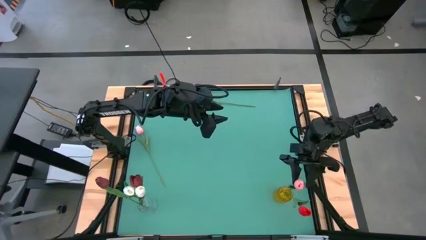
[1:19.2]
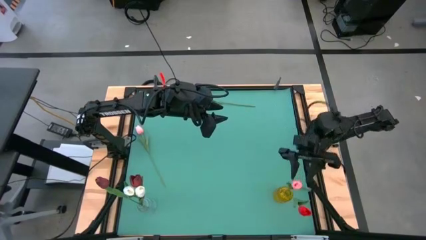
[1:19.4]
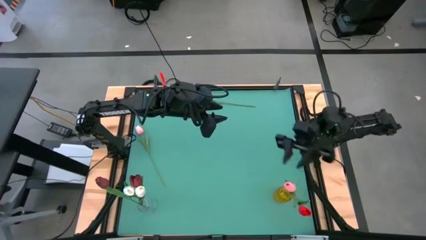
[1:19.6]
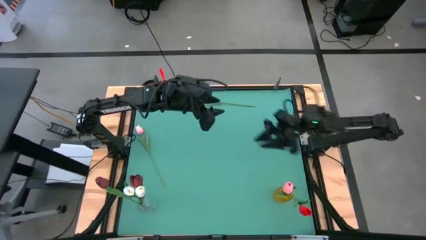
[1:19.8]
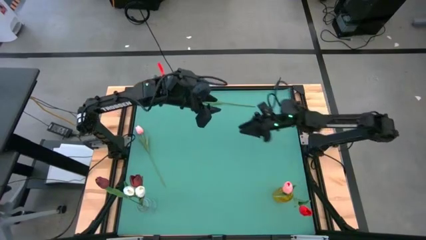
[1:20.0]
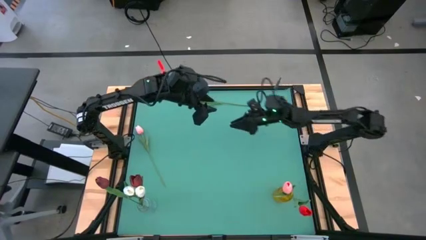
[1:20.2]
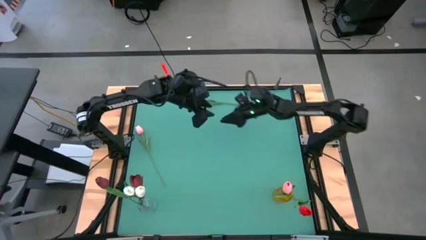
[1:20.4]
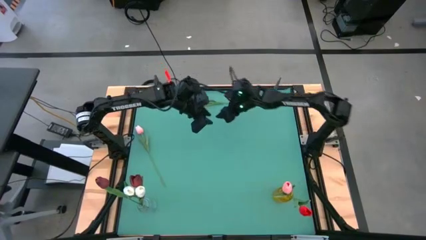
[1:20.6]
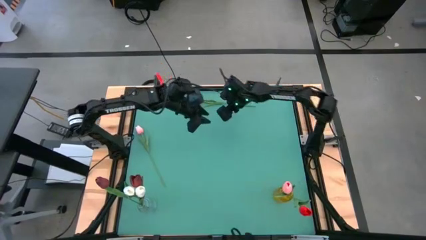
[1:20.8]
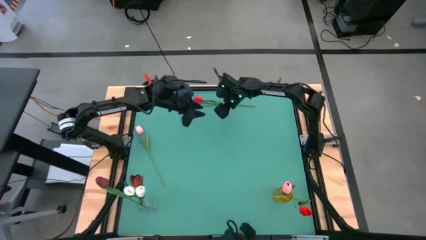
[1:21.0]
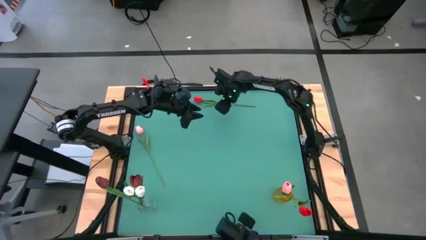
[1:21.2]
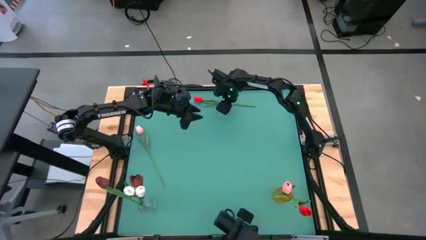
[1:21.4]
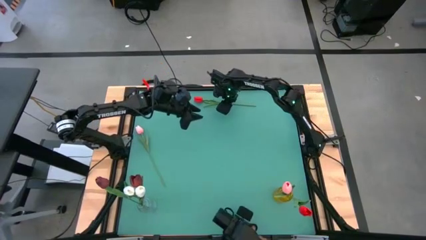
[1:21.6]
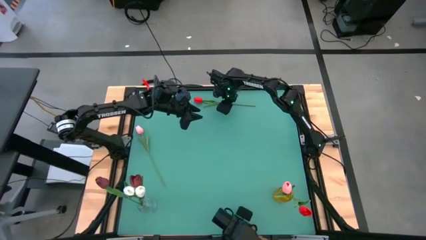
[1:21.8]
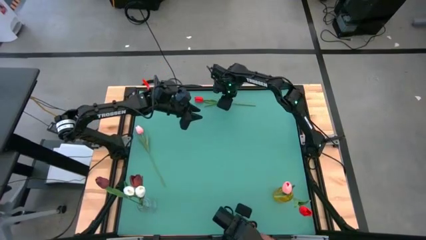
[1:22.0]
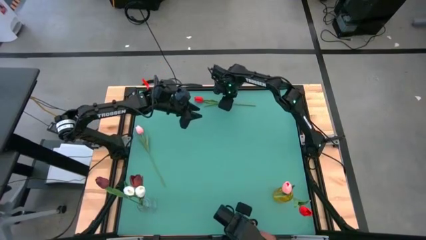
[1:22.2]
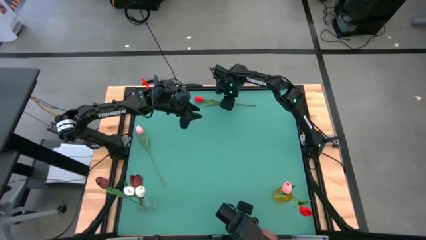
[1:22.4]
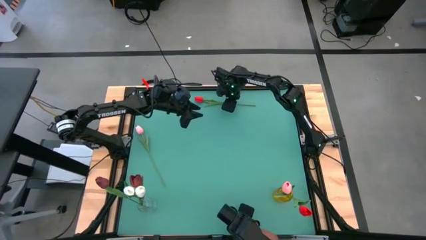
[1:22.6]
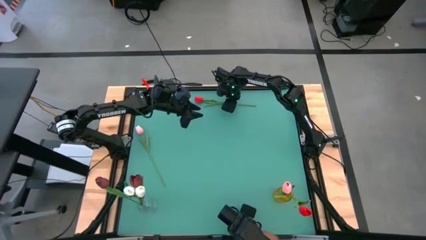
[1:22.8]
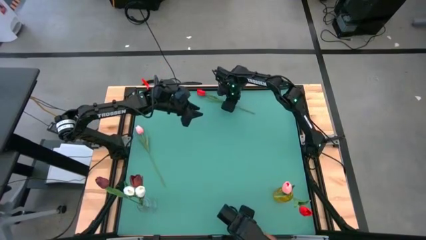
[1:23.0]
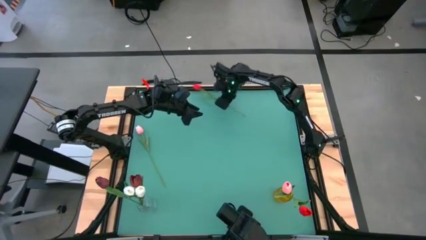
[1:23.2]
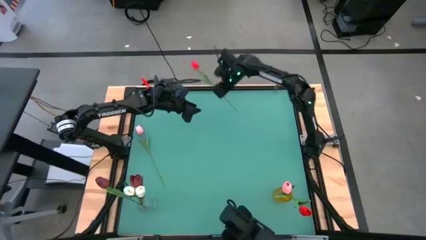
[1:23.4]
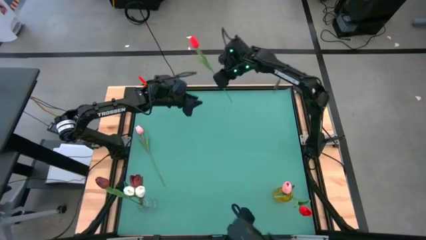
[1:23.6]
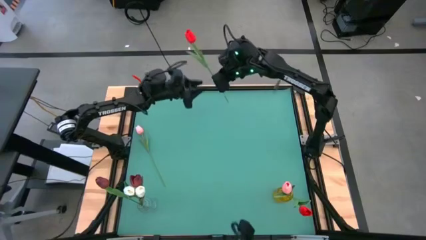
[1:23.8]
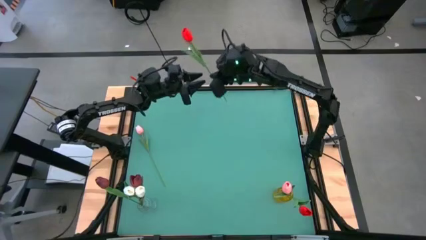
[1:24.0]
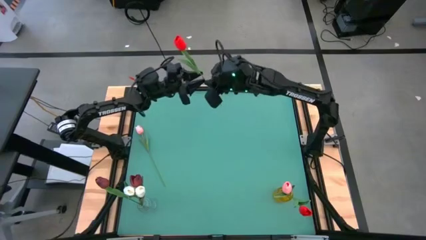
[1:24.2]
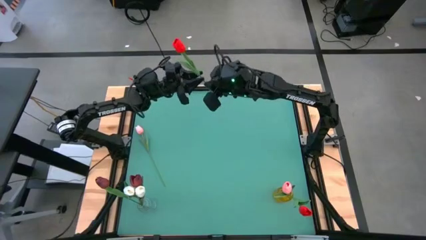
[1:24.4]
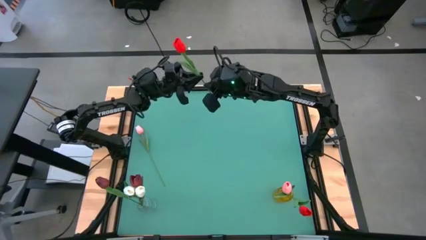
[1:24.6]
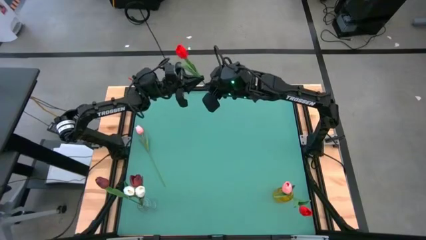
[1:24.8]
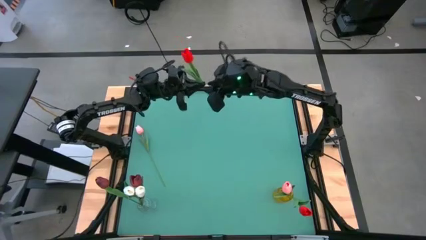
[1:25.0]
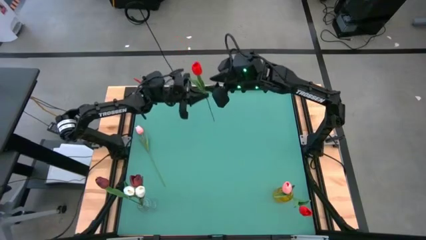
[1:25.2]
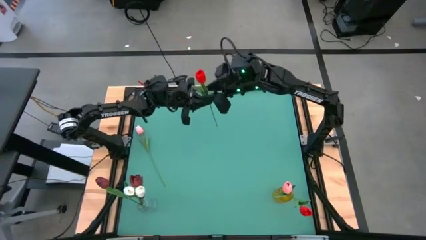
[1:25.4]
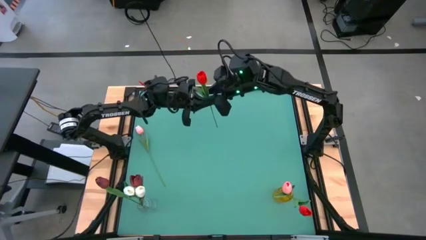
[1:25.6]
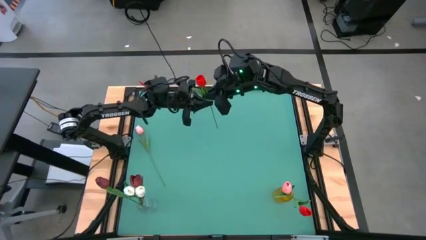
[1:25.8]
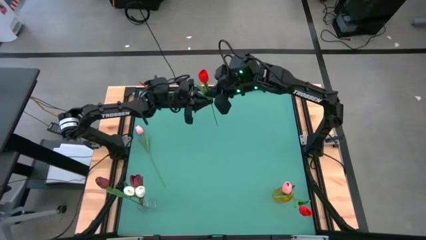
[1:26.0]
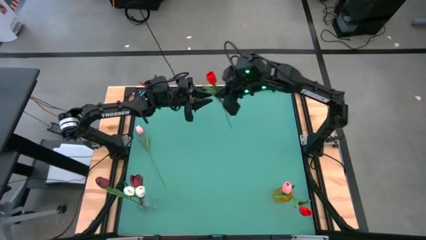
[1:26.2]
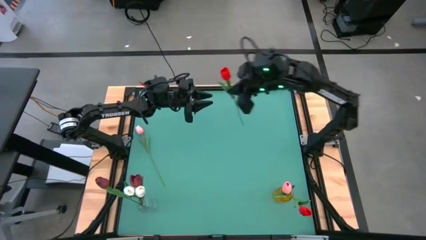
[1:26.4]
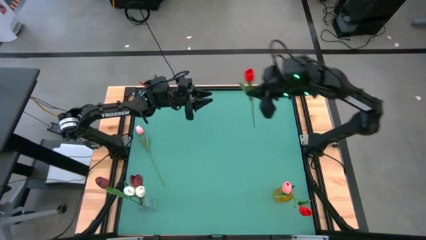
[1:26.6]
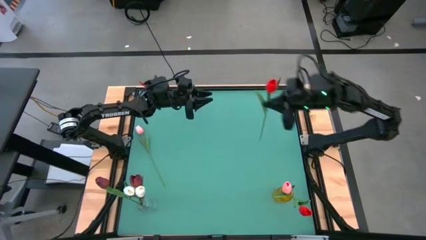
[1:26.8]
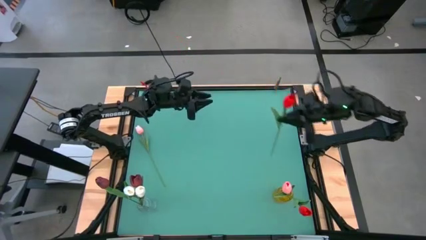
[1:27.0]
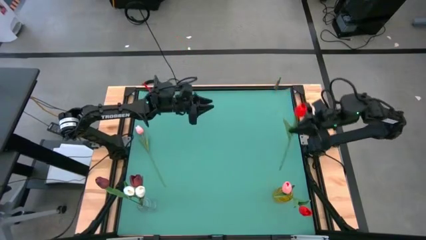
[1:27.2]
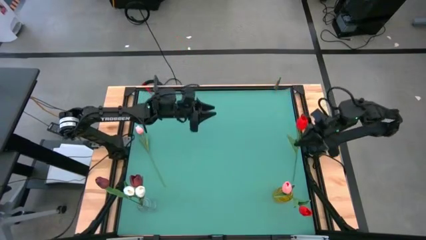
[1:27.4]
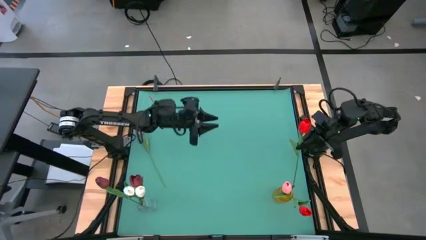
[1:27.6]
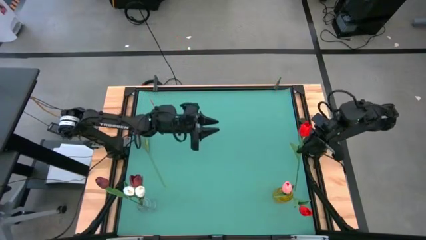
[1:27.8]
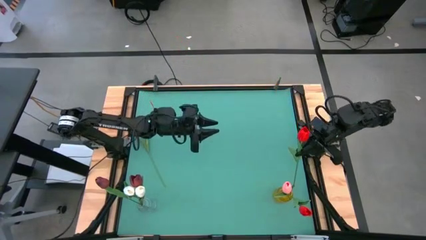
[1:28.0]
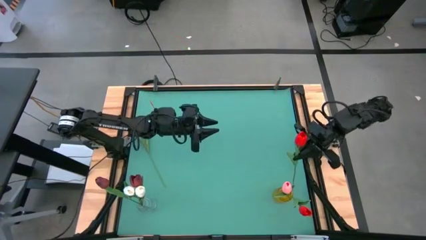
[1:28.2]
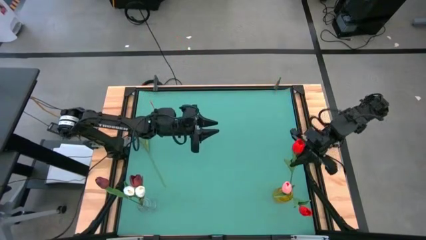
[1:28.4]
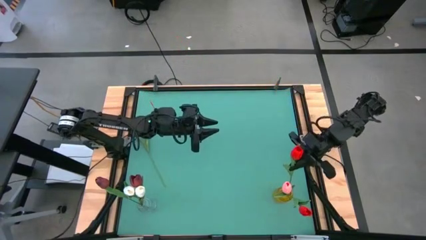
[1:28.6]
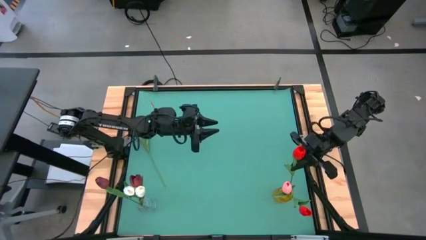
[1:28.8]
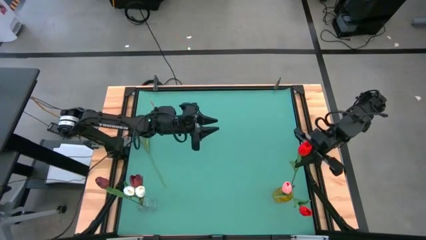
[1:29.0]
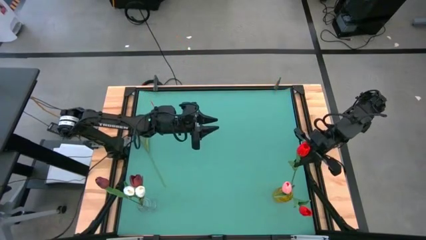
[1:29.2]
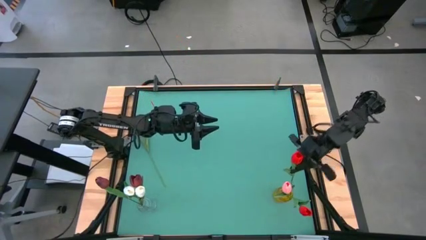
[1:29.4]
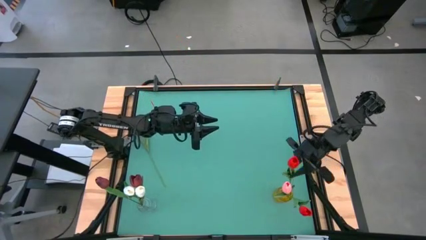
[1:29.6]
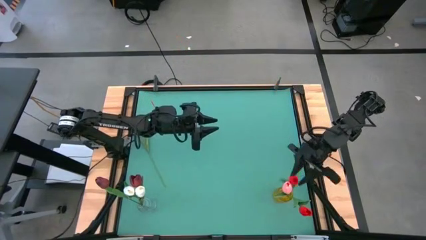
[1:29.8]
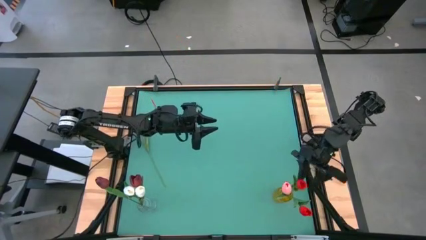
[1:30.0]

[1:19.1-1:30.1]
Task: Sort flowers into vase by color
Put the red flower into the yellow vase

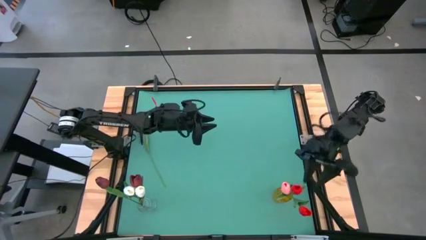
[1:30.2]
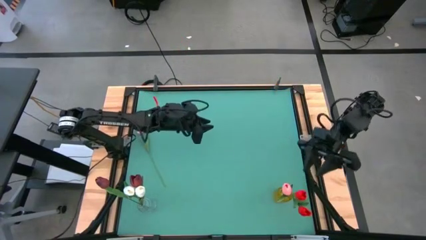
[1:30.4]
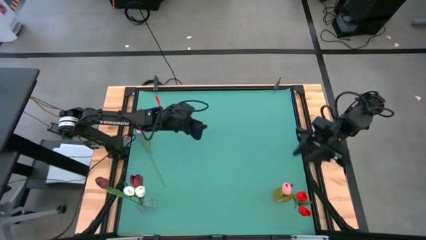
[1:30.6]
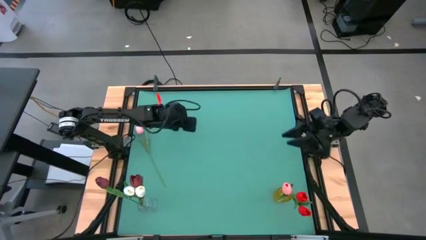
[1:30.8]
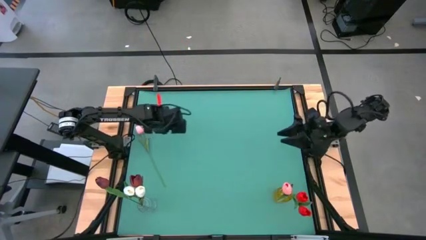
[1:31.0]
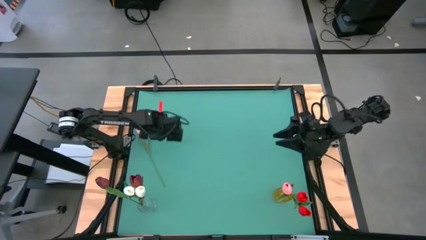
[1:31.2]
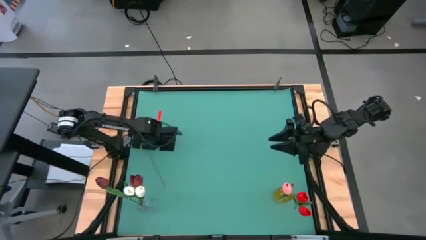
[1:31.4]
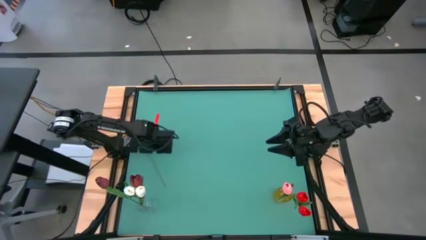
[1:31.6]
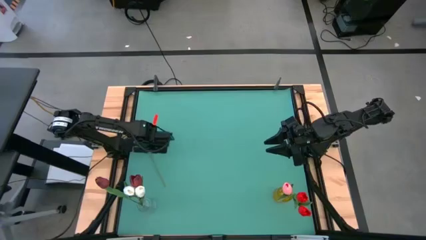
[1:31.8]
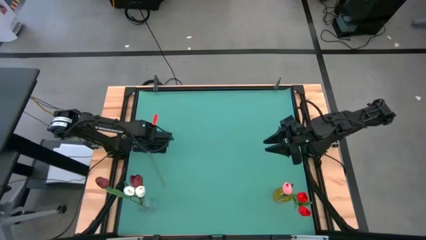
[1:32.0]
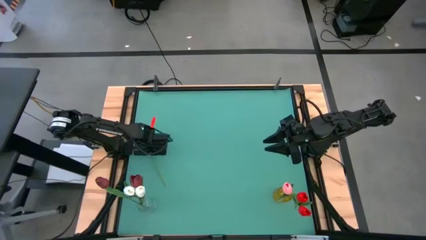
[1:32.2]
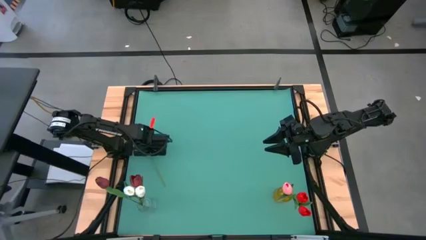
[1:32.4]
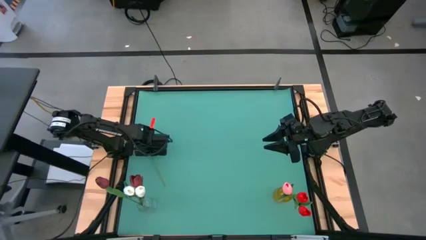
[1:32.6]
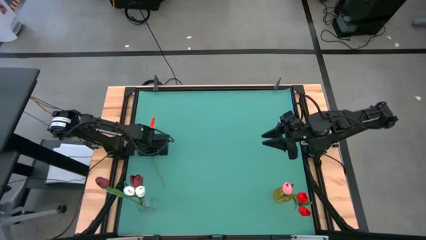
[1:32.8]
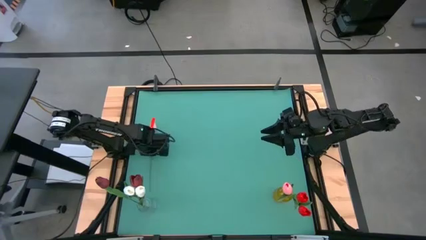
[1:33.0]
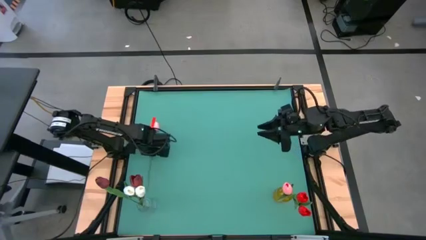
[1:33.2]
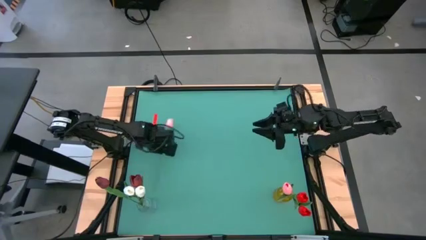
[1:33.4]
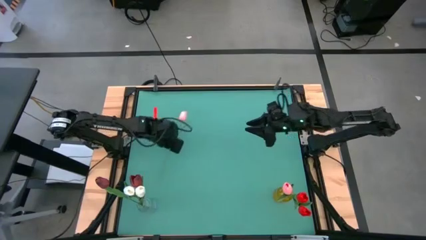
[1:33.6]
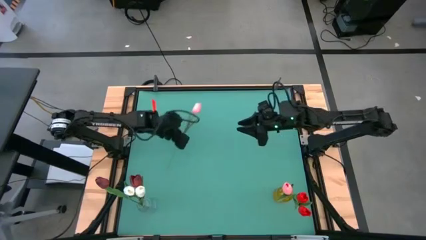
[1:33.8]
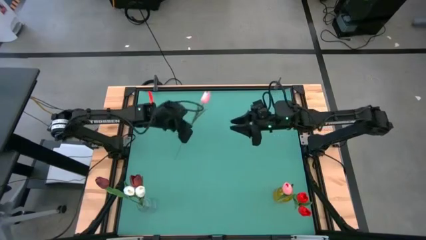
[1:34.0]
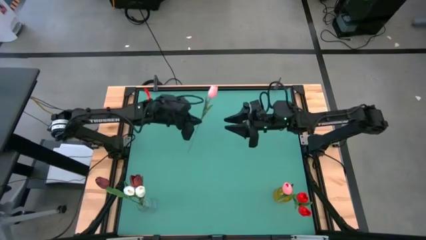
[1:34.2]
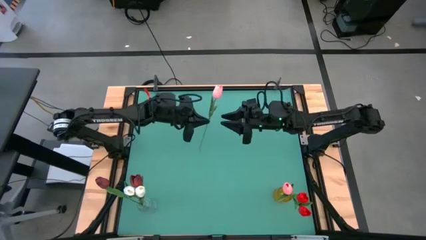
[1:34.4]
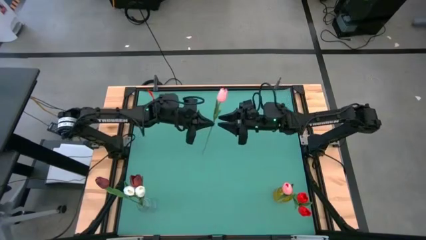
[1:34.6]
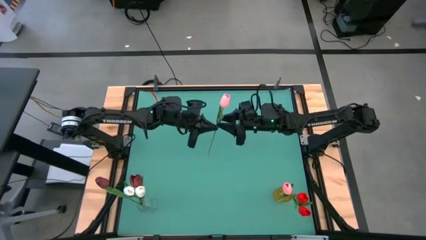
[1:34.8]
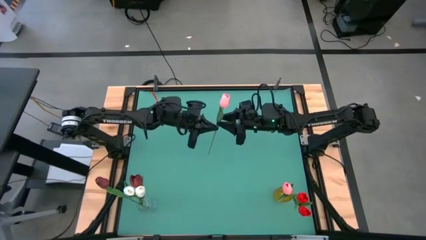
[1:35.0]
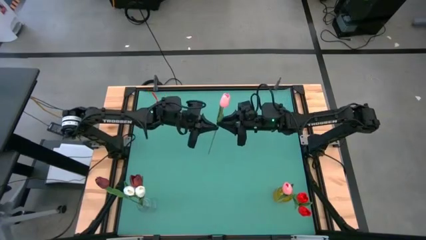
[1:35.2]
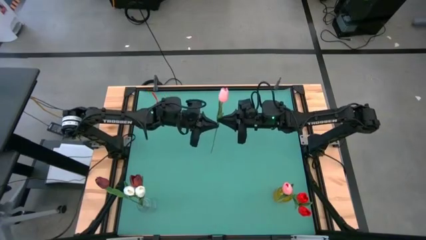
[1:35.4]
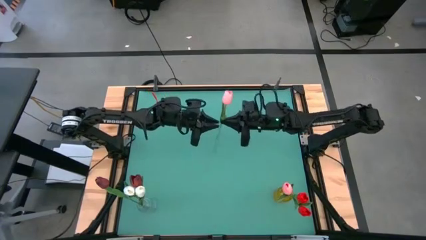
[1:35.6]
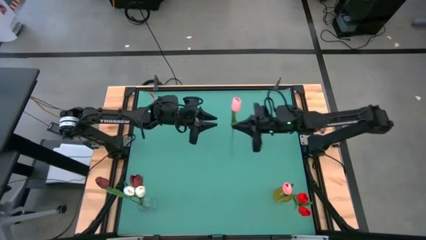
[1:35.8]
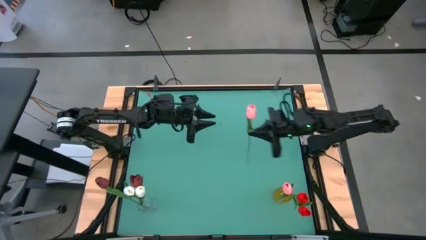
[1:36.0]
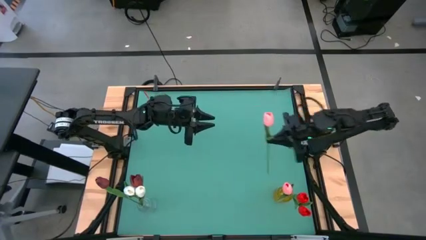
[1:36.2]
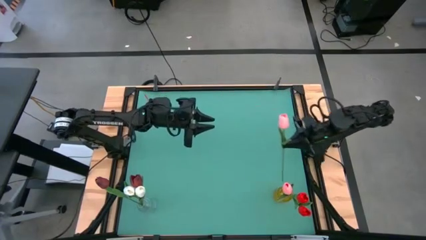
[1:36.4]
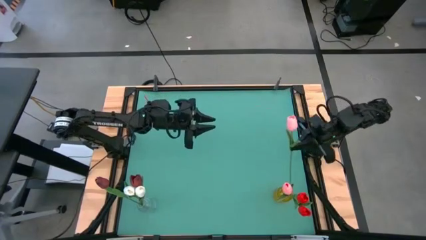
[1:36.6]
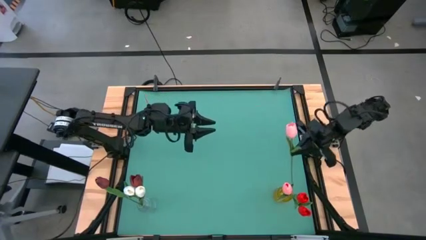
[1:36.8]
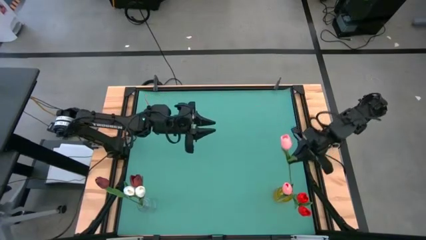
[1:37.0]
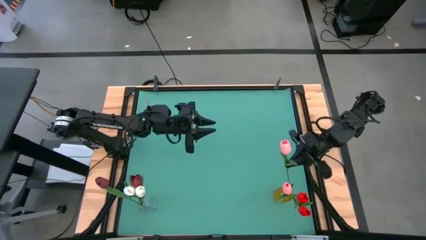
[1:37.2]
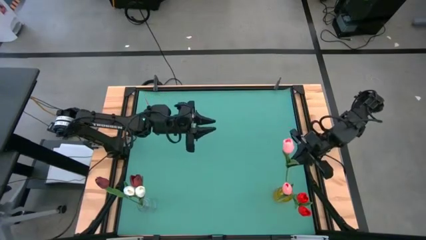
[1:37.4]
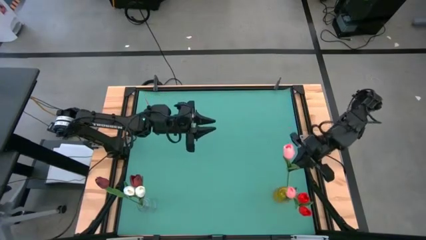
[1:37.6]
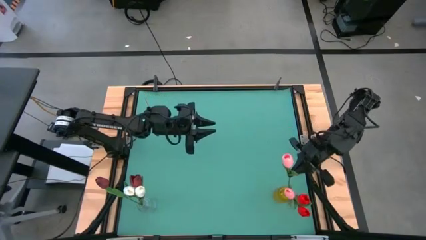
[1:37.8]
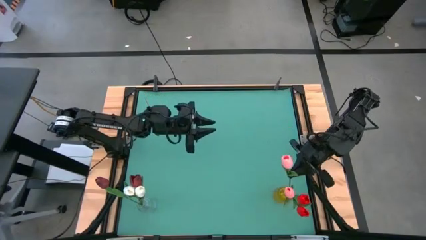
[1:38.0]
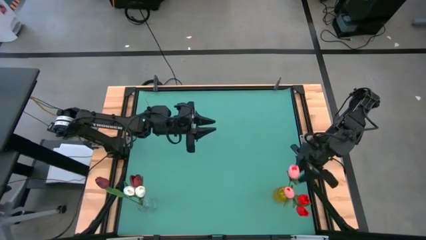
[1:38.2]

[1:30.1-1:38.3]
Put the pink flower into the yellow vase
